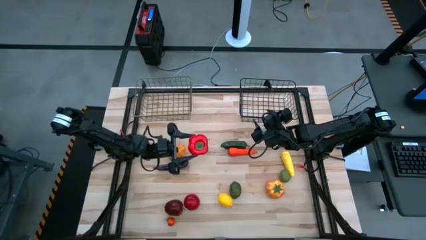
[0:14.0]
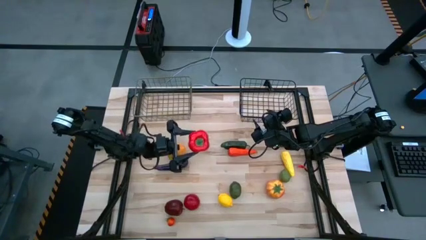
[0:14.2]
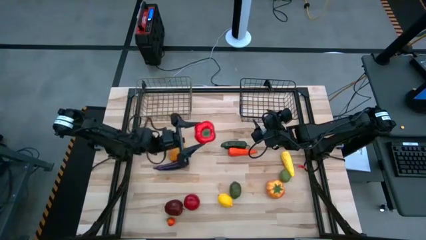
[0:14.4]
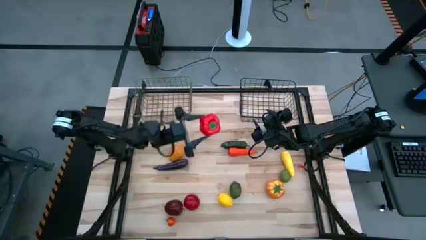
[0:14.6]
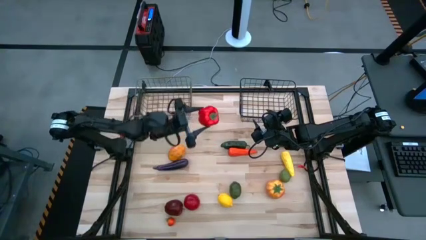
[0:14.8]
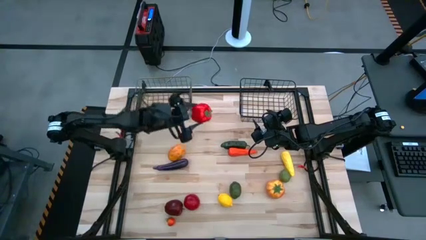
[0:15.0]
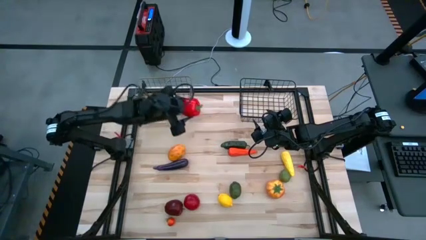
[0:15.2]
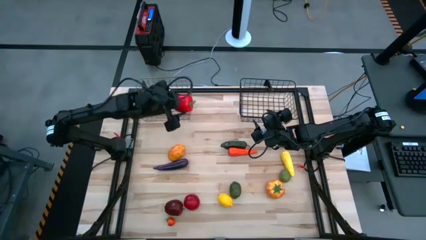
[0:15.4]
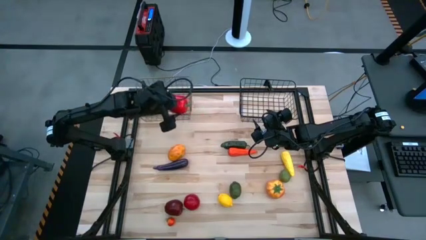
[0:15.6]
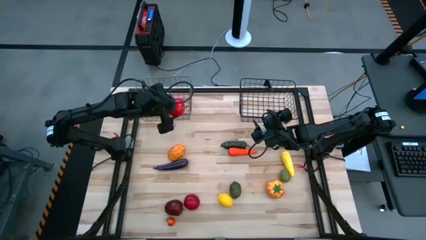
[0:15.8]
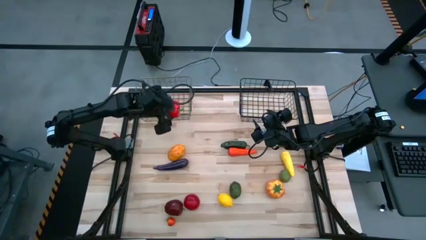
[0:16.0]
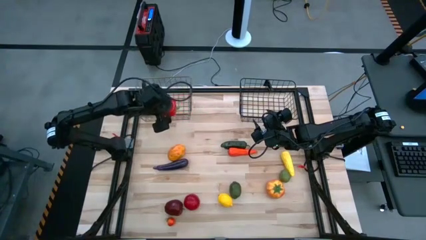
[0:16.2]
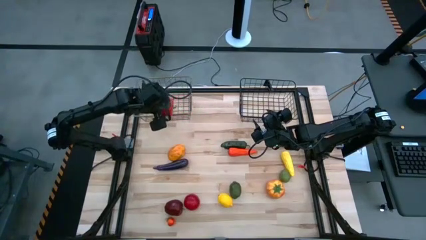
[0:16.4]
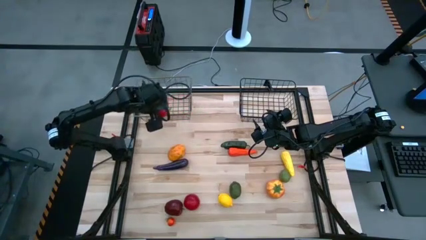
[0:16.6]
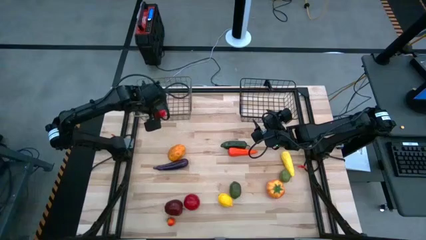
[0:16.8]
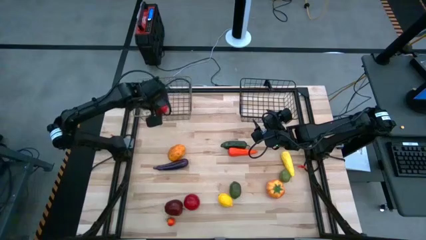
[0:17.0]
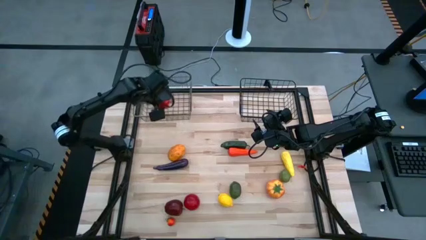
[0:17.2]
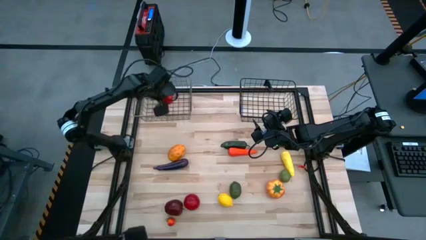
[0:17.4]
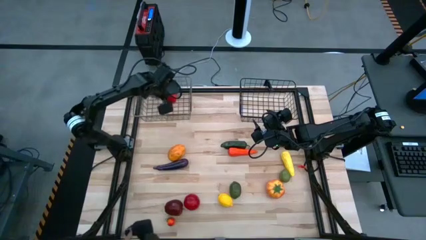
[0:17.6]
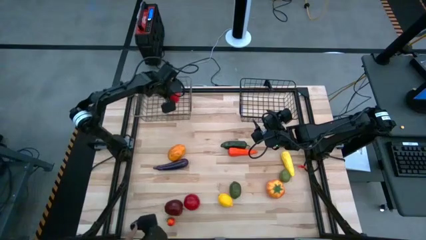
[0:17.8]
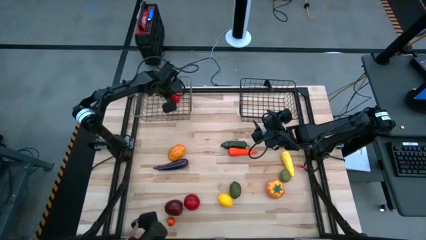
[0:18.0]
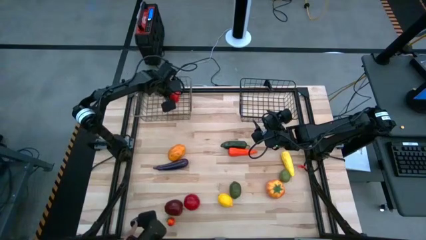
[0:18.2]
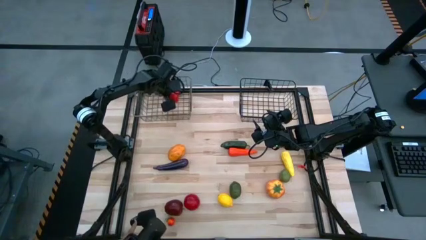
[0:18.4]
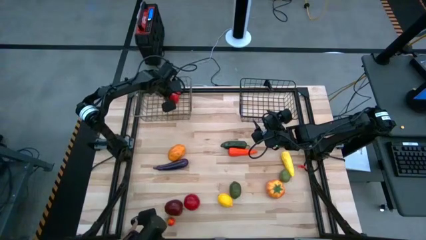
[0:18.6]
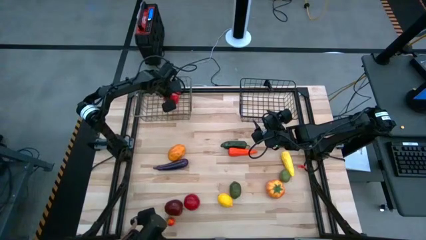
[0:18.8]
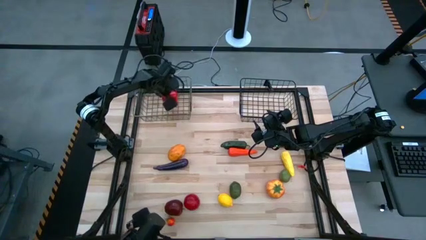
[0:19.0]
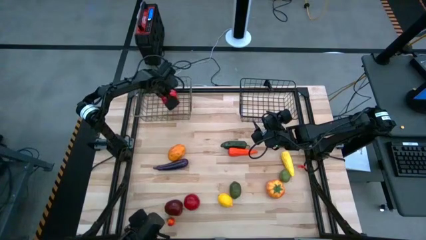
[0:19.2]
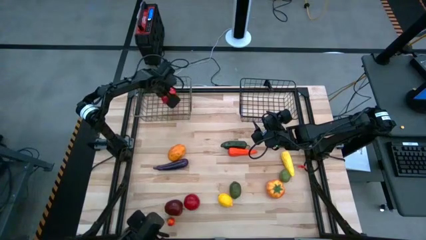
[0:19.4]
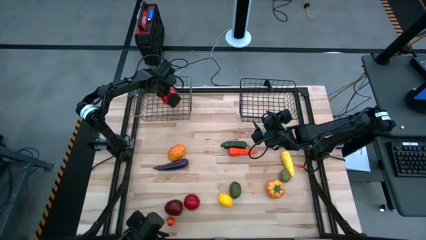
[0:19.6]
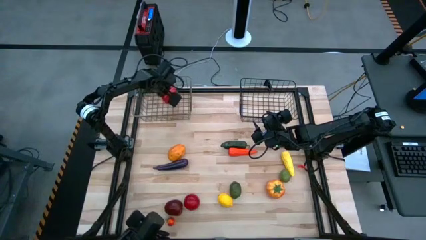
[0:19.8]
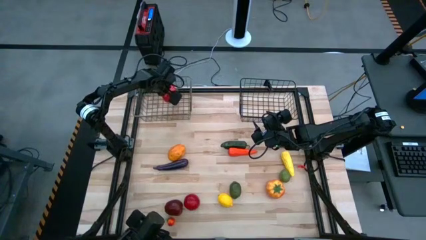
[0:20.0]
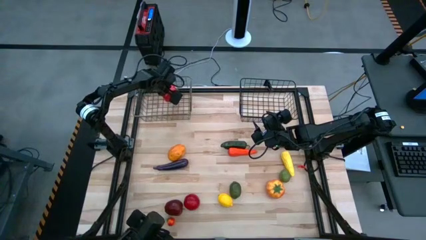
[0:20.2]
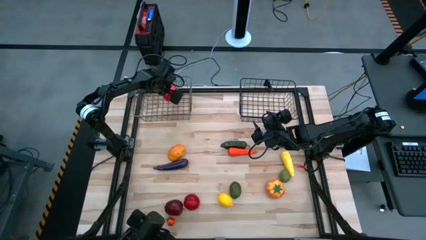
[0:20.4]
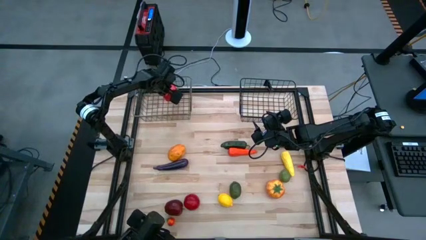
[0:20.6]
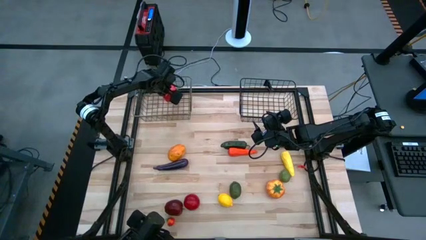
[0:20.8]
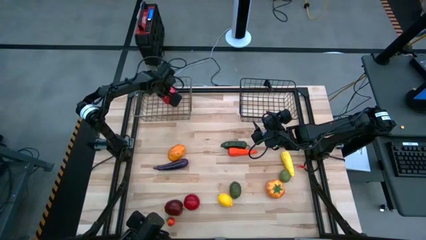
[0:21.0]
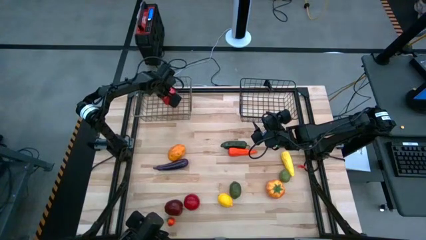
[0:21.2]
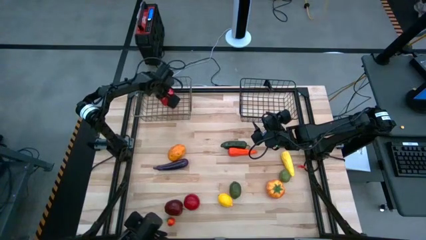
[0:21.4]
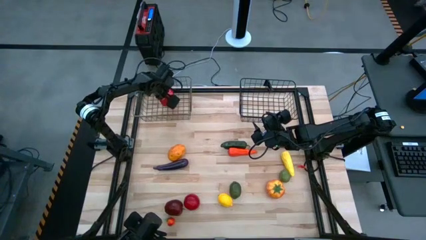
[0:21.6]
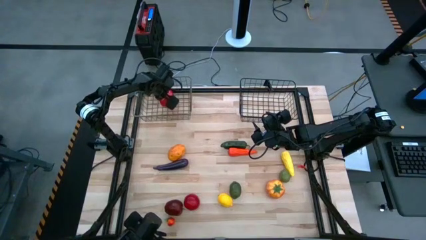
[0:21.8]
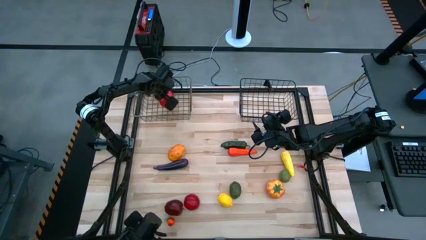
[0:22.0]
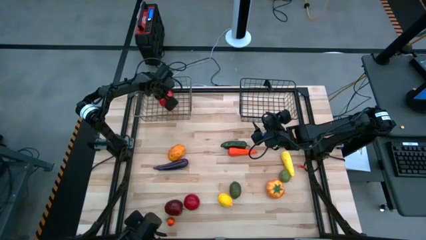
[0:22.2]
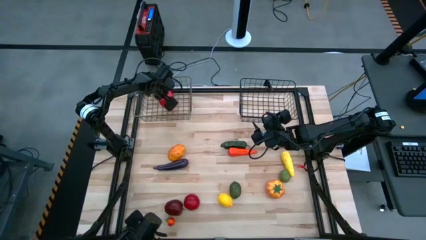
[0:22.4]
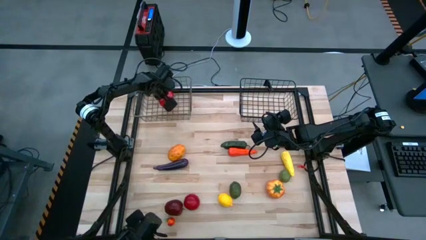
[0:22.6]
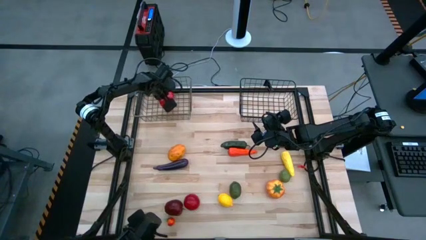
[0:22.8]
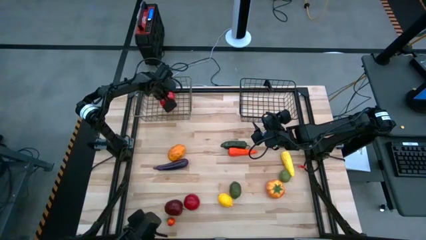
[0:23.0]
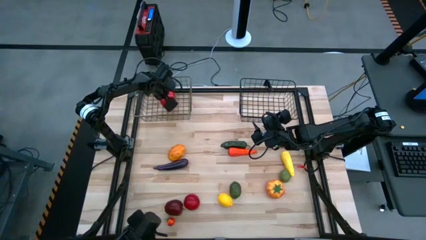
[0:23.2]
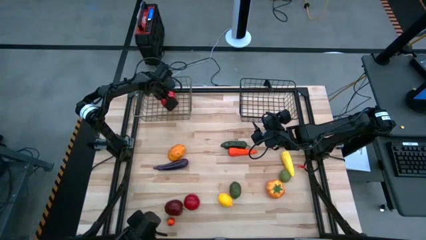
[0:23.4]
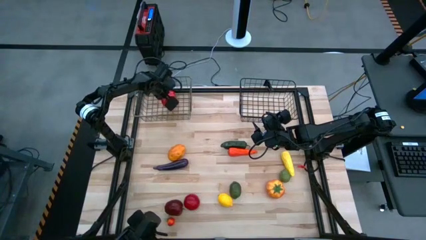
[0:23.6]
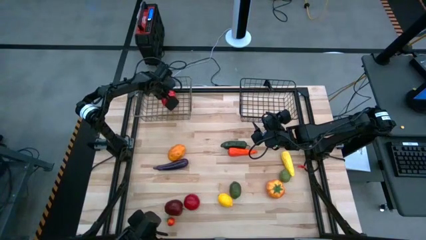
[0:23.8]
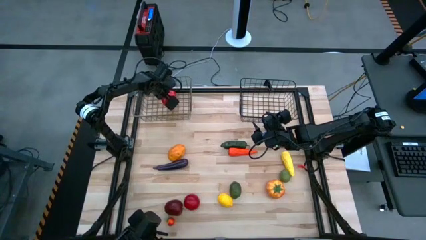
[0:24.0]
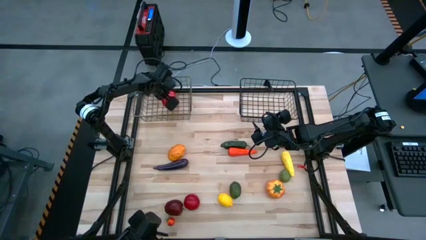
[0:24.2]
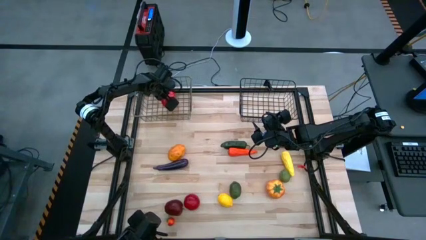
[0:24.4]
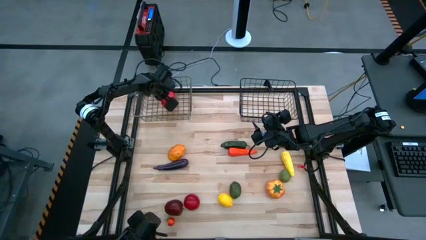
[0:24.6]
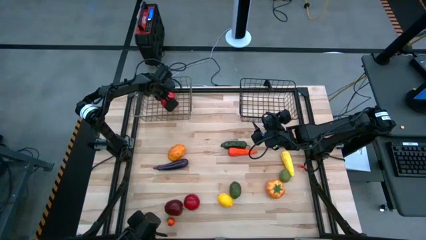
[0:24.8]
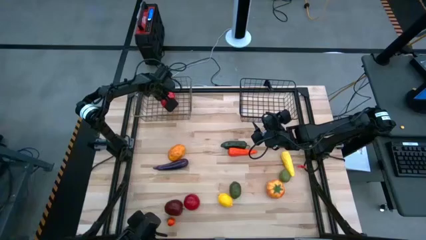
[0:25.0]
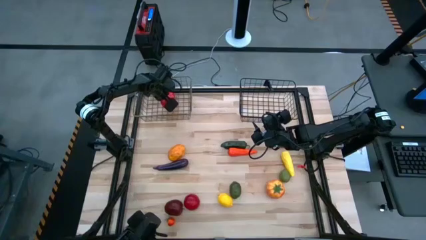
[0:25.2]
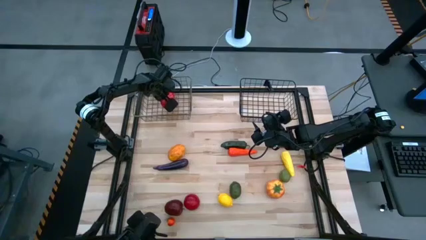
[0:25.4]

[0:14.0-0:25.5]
Task: Sort produce into baskets
Put the bell pepper into the brown wire basket
